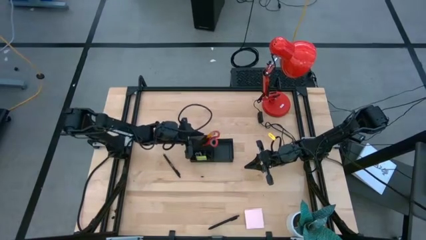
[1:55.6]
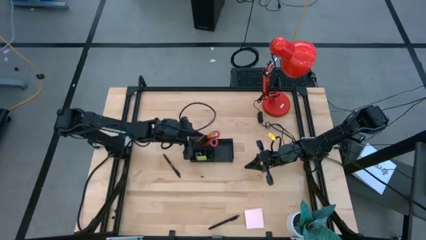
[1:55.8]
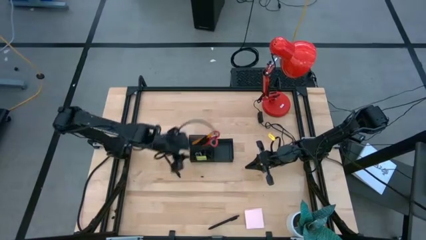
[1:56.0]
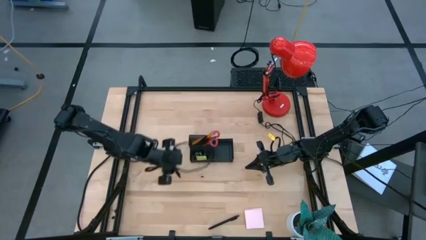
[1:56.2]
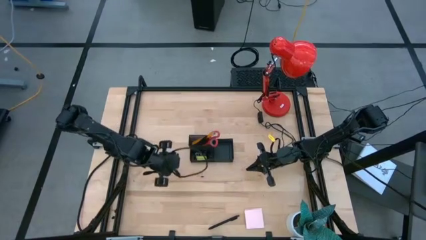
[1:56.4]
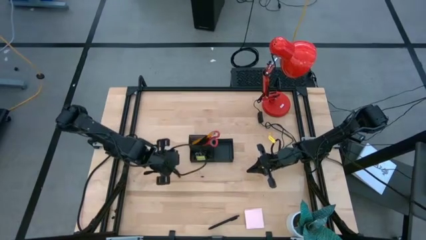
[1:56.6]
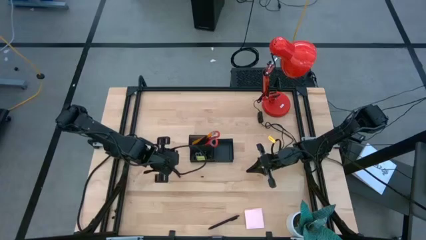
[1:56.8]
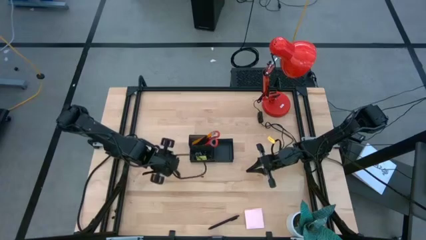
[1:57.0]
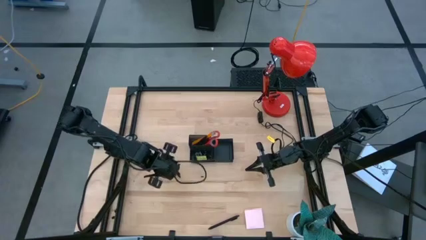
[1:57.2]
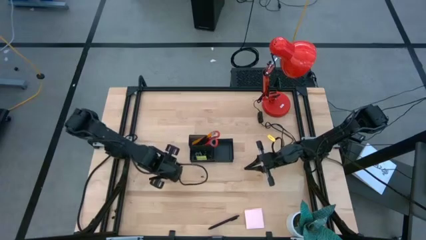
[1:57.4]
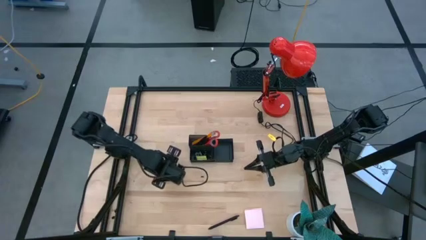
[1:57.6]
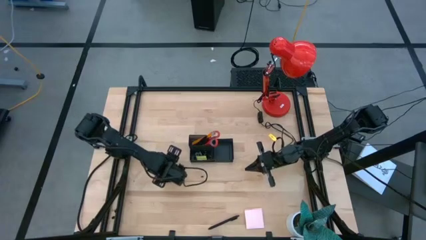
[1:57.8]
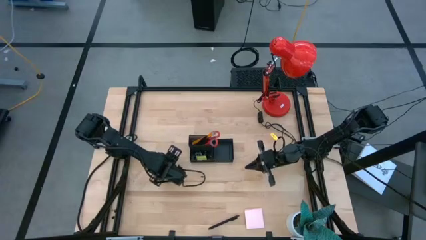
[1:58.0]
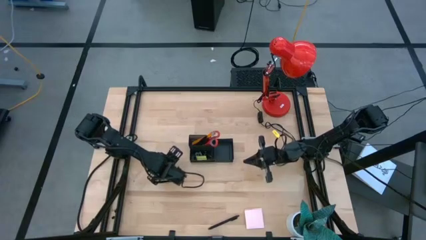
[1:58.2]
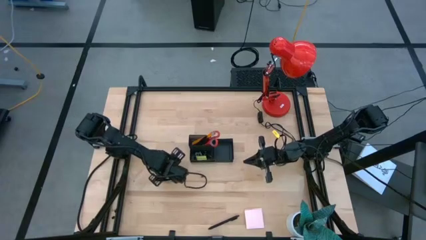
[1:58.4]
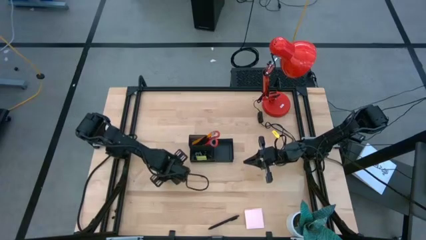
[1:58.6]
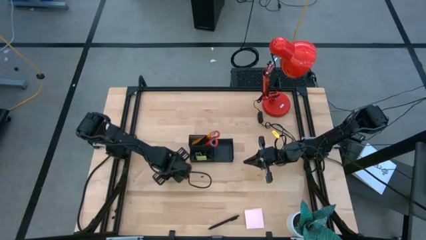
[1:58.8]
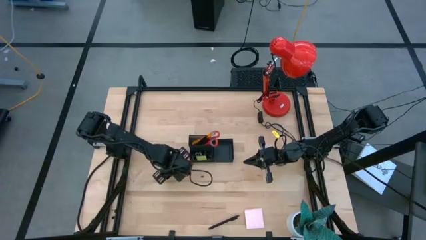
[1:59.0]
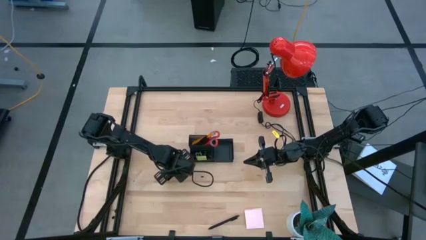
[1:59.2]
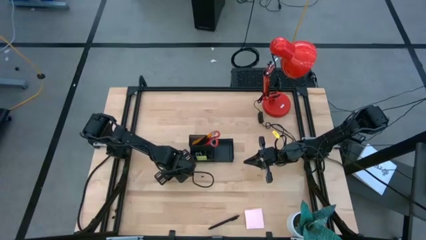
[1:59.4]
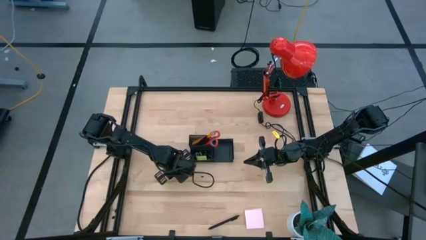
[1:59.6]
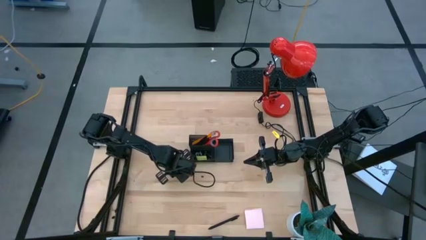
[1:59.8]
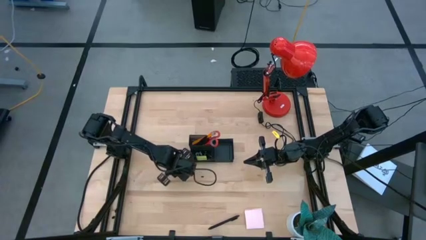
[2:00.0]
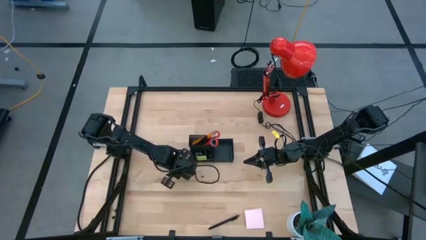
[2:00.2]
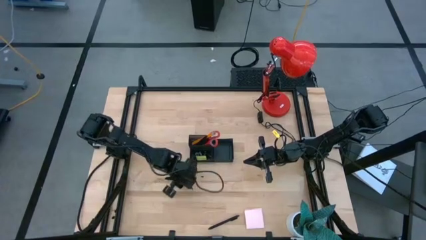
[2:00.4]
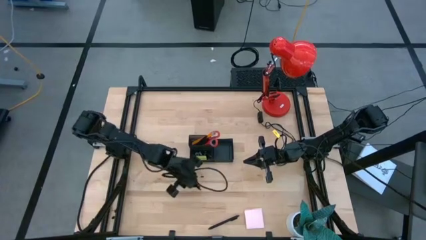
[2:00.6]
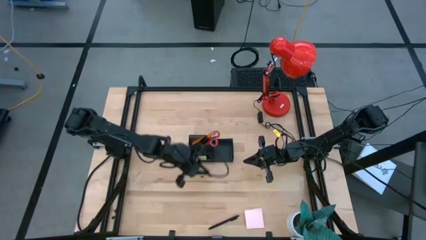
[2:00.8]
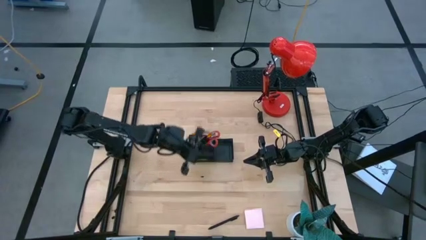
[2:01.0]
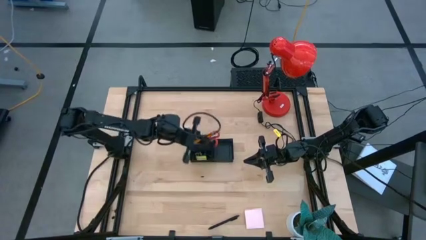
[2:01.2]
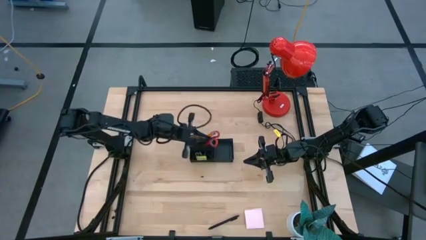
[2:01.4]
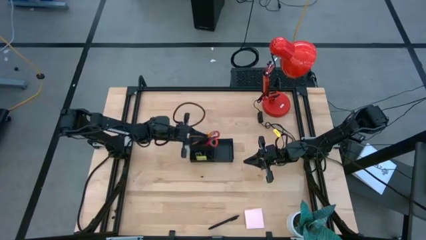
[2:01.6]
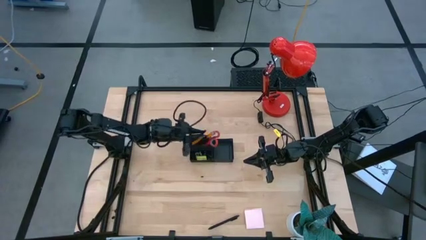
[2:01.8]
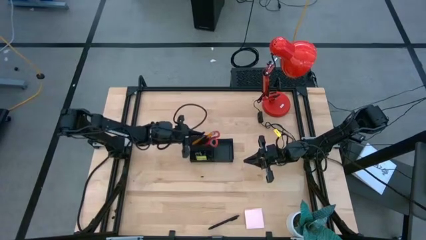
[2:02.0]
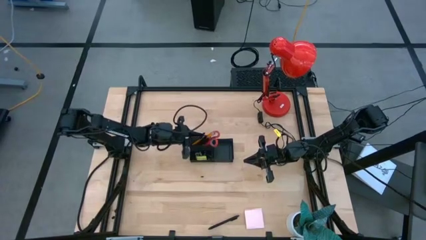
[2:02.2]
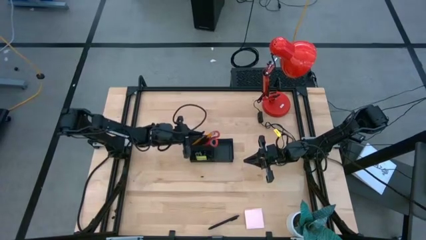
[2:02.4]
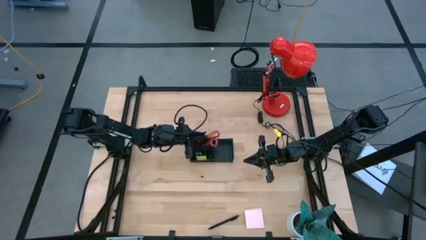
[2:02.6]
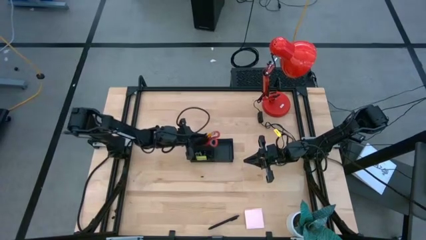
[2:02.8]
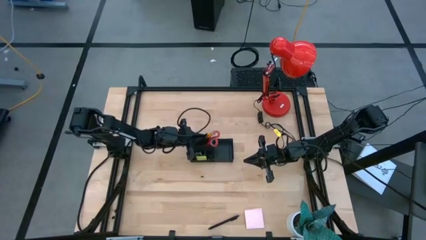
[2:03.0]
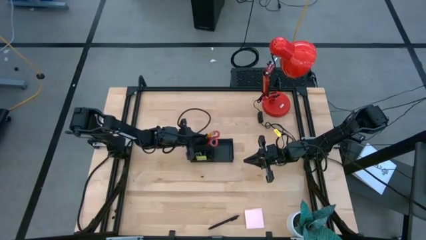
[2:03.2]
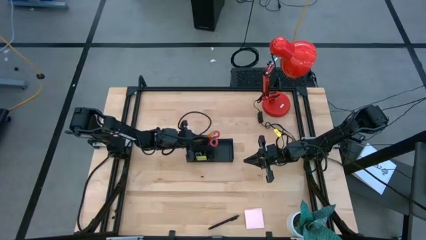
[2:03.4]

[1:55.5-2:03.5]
Task: Pick and place office supplies into organizer
Put the black pen into the black desk organizer

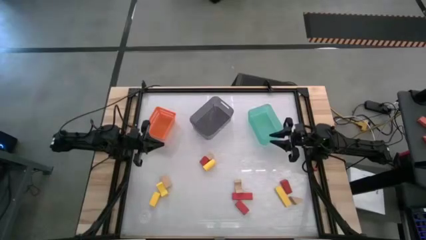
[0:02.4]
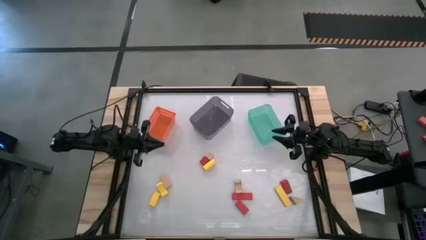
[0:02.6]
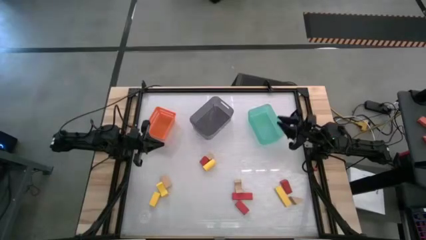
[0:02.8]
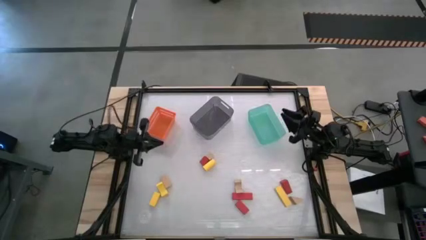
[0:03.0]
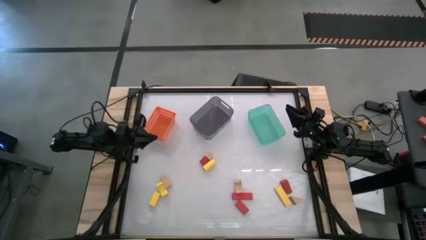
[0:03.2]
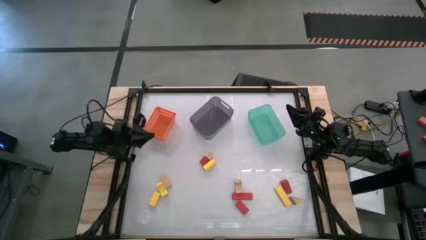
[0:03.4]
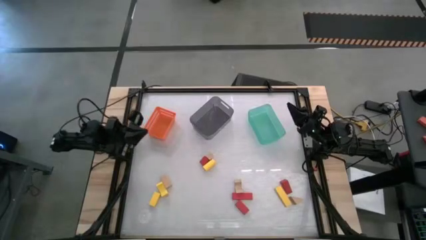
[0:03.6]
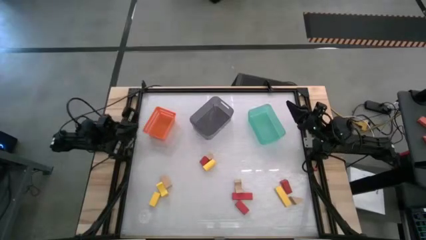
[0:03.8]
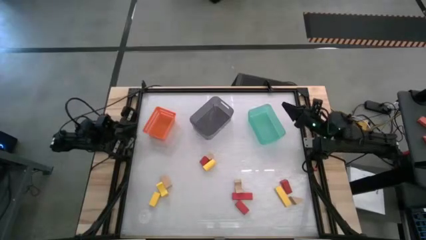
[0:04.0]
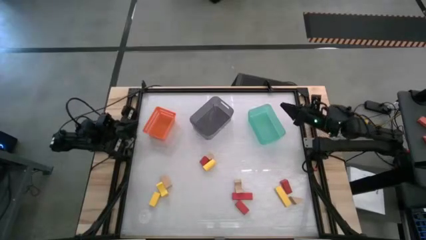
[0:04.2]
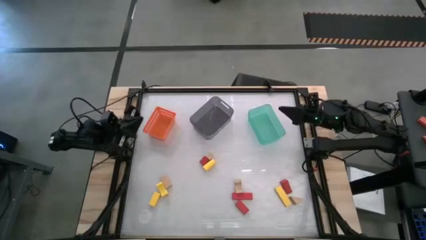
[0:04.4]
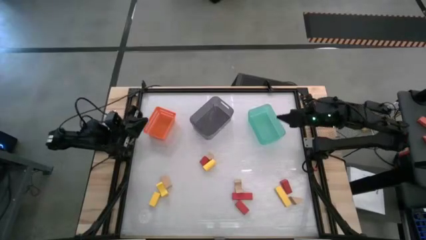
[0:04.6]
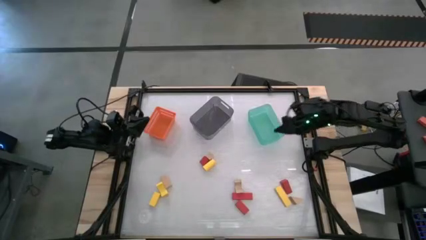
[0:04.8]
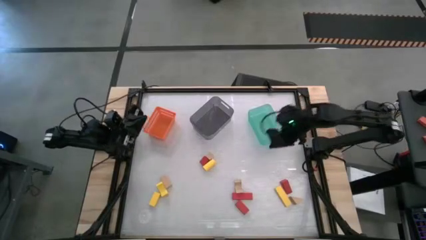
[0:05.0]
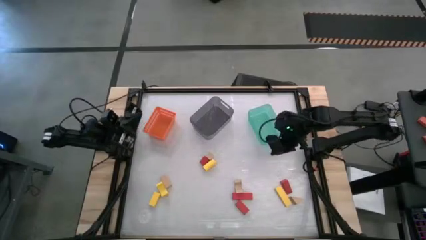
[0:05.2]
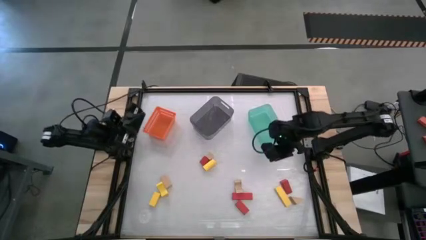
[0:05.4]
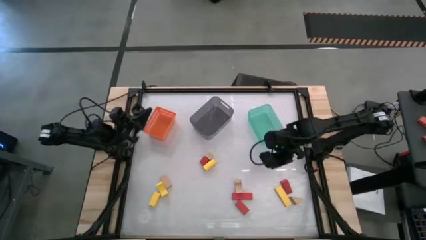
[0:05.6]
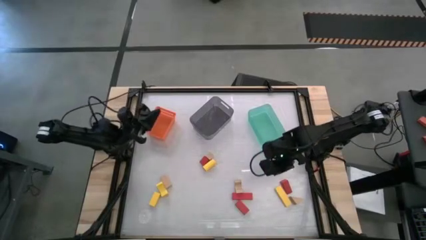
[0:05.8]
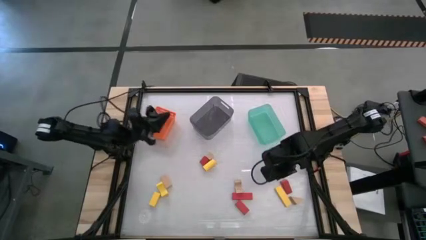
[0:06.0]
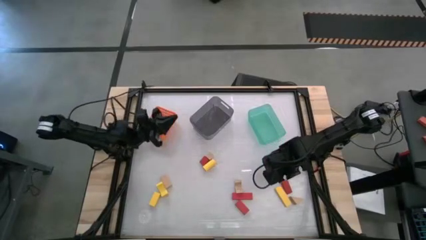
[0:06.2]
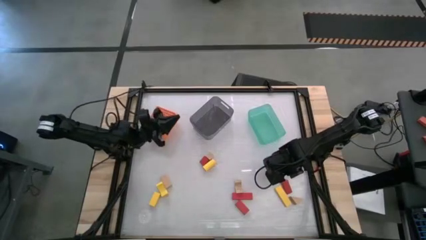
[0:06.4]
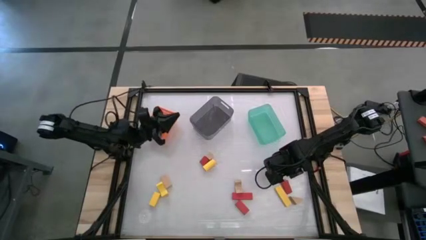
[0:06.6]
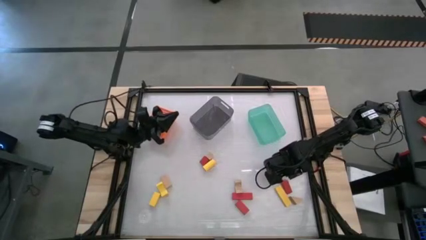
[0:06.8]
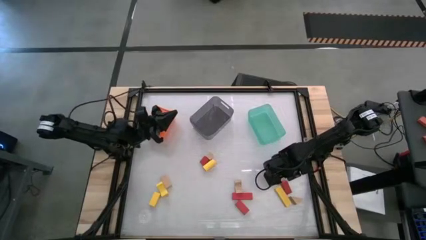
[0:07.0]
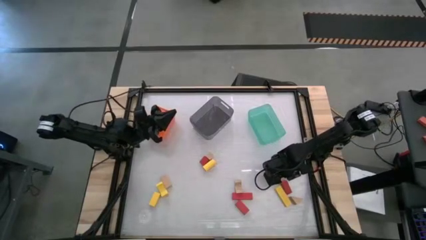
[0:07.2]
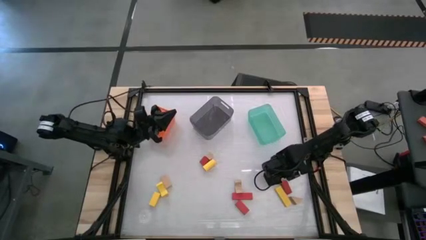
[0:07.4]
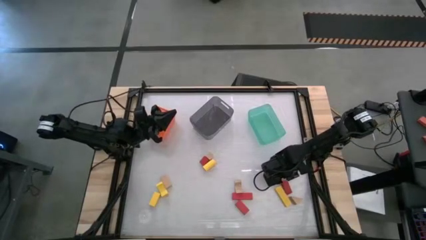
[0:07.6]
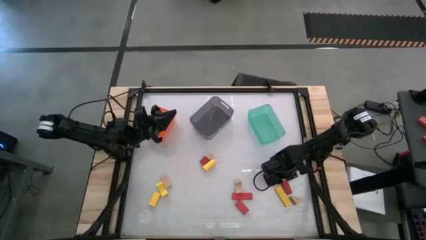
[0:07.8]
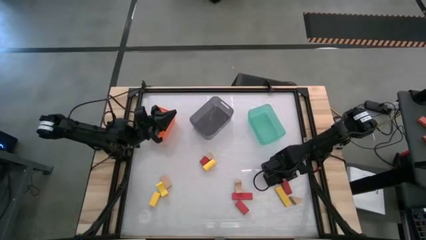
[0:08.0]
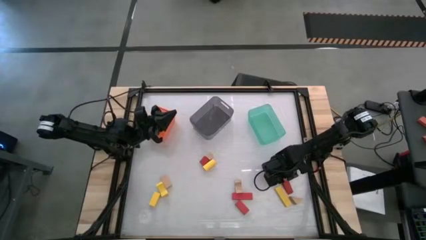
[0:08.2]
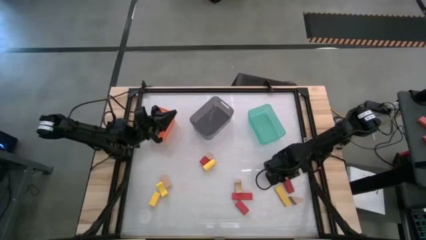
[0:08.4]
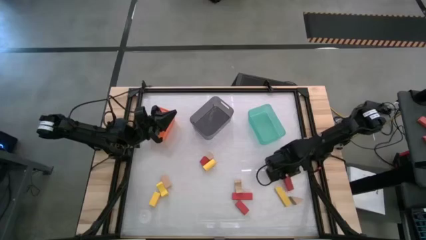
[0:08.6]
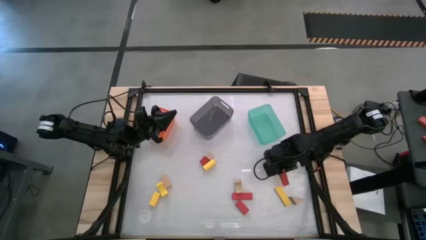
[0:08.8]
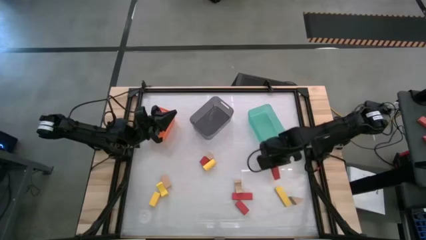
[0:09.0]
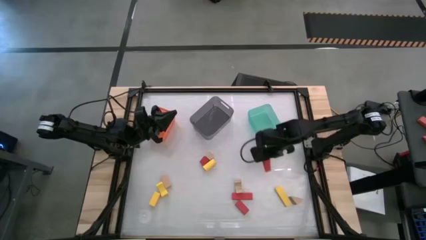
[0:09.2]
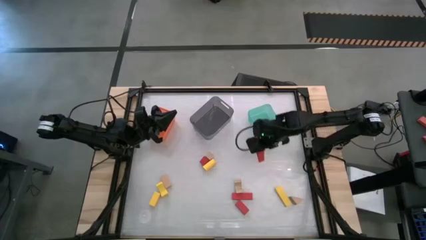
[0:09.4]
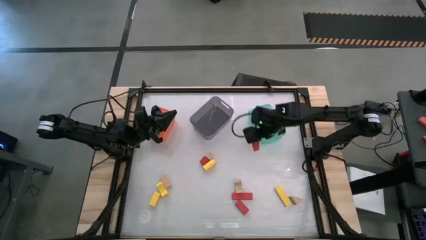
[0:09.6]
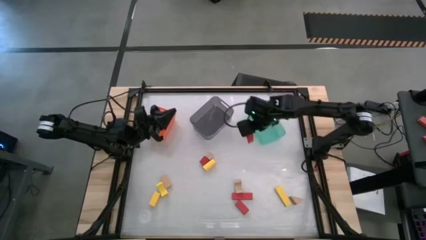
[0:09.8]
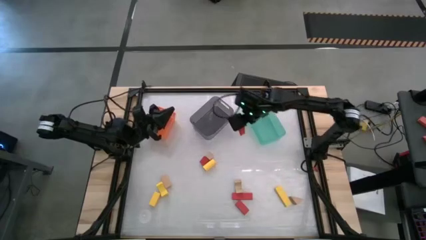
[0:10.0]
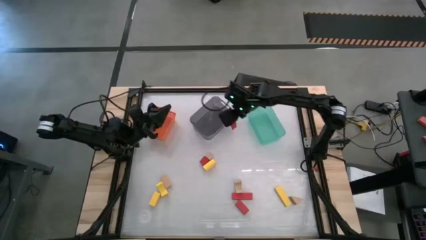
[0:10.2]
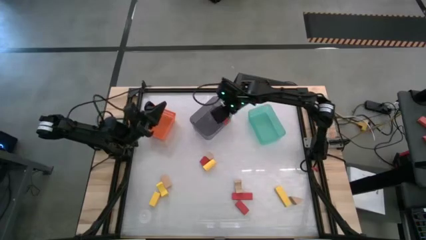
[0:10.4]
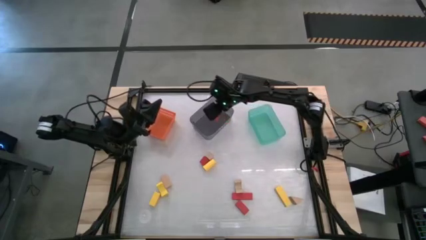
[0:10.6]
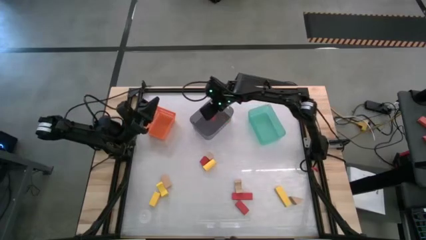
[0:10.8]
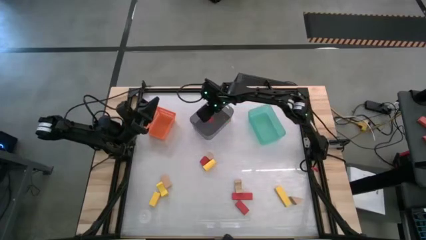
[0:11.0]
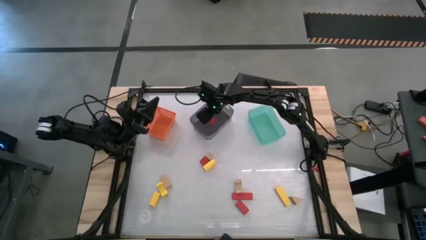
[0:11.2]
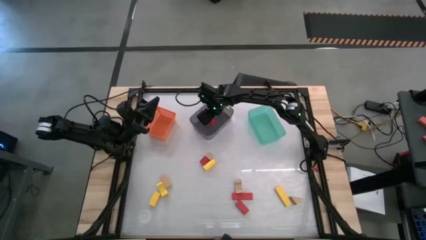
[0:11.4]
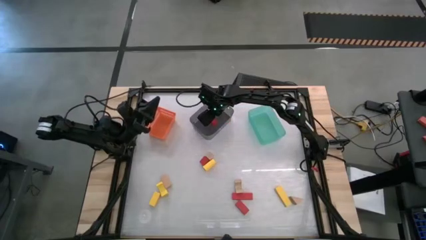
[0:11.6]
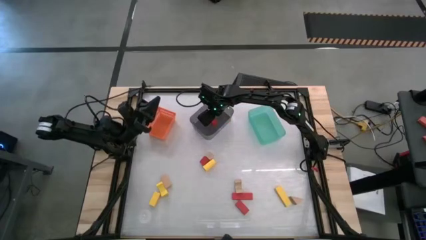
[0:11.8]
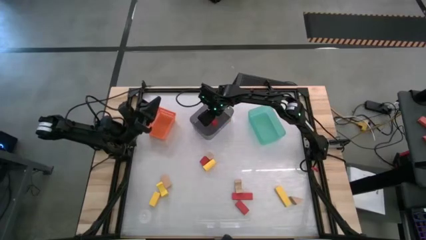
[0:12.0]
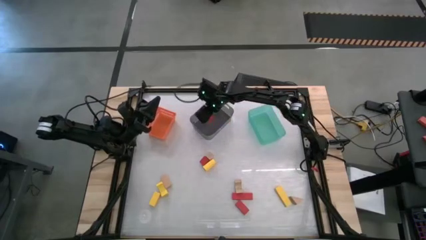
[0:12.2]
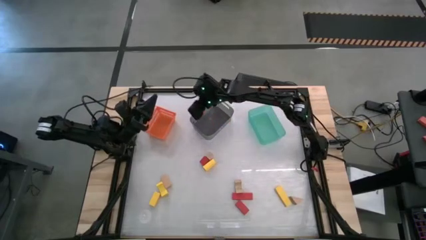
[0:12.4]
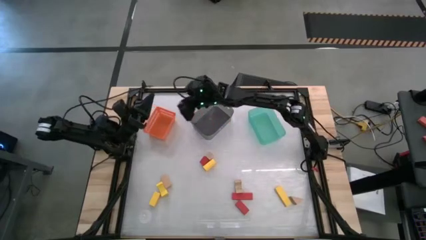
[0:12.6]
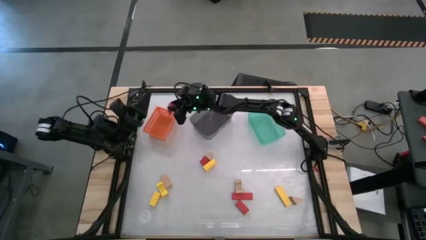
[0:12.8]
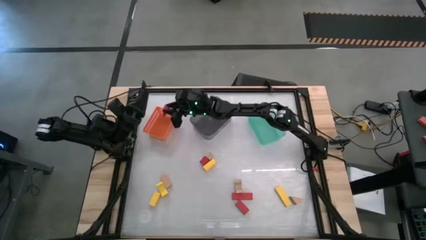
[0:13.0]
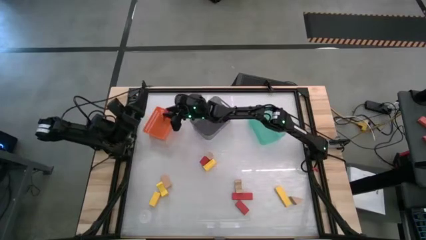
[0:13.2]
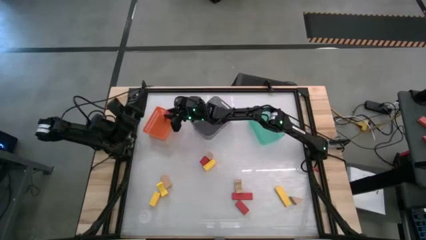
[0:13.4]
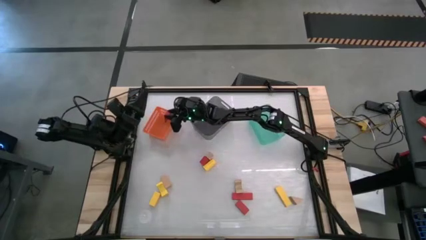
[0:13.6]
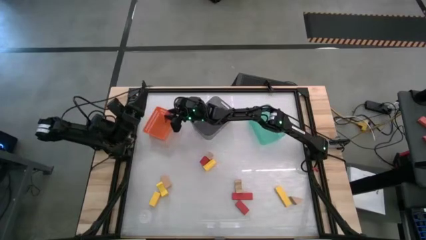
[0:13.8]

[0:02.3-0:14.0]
Task: Sort & place blocks by color
Put the red block into the orange bin
